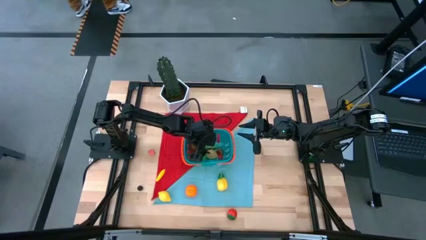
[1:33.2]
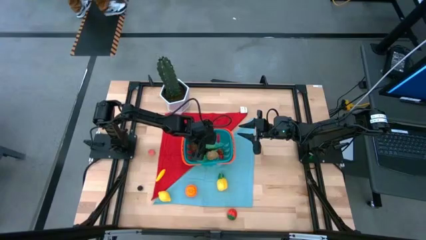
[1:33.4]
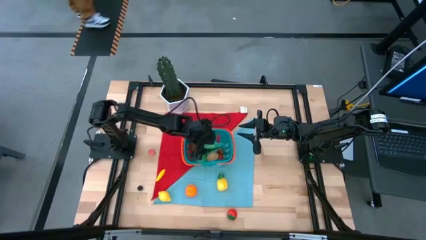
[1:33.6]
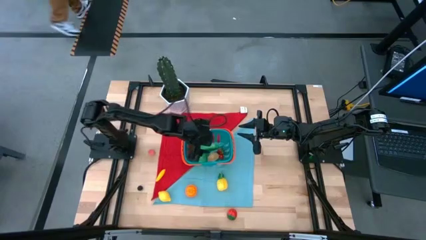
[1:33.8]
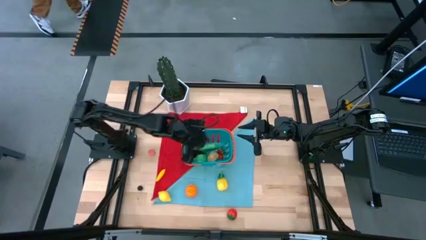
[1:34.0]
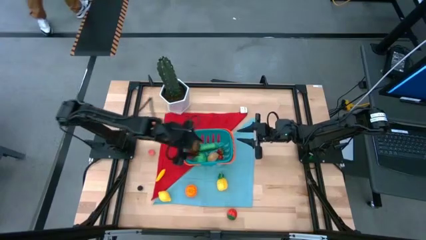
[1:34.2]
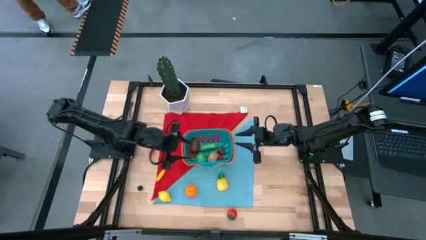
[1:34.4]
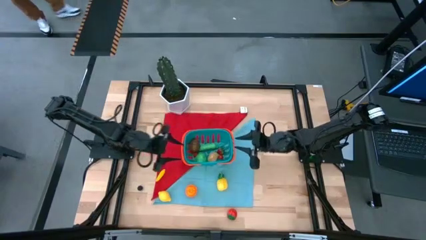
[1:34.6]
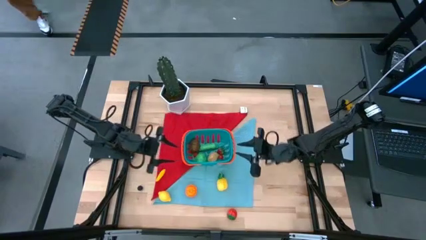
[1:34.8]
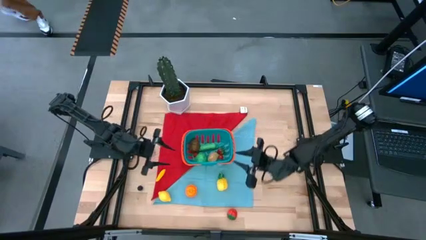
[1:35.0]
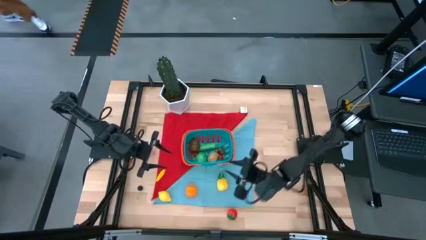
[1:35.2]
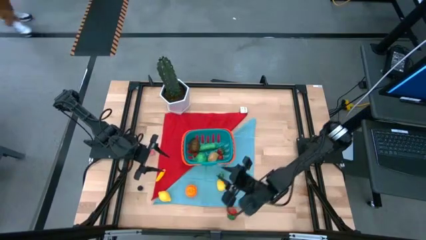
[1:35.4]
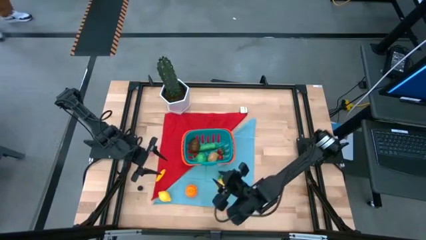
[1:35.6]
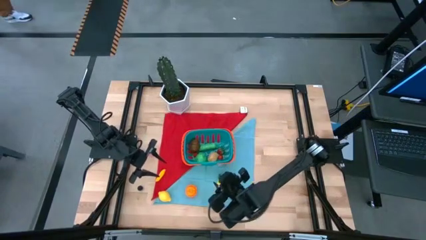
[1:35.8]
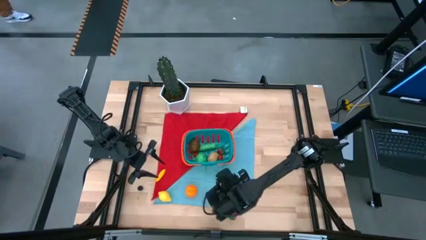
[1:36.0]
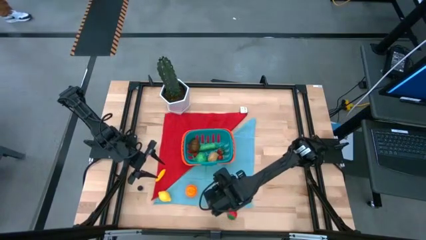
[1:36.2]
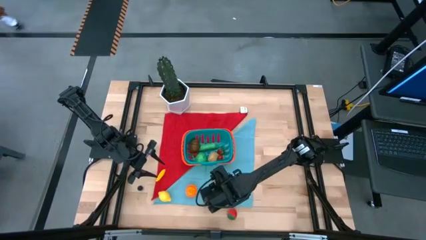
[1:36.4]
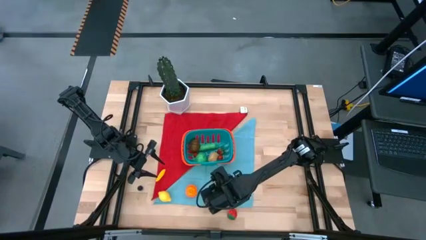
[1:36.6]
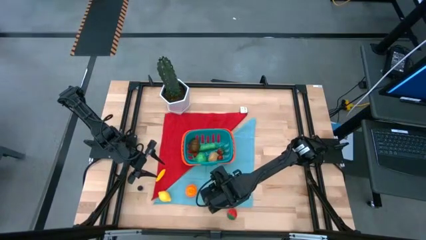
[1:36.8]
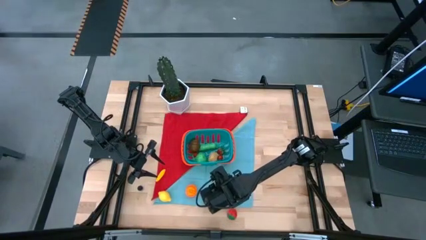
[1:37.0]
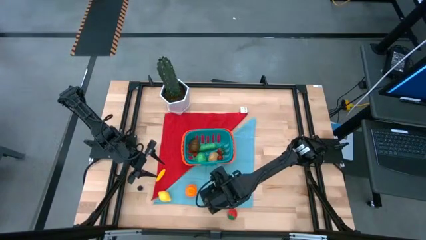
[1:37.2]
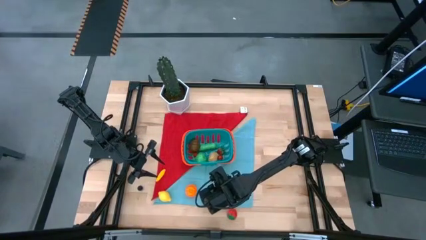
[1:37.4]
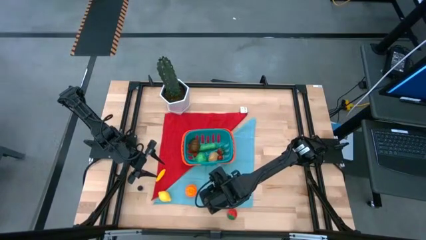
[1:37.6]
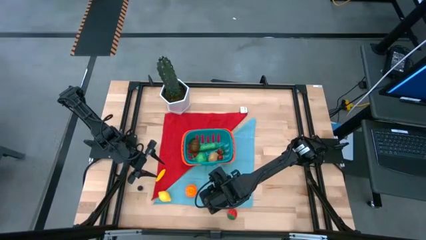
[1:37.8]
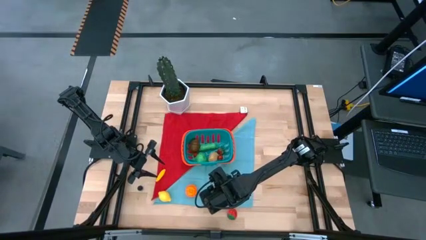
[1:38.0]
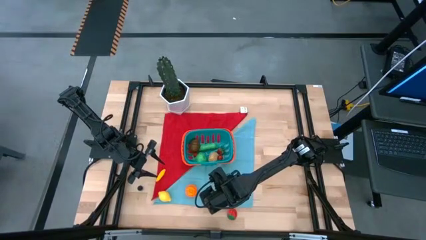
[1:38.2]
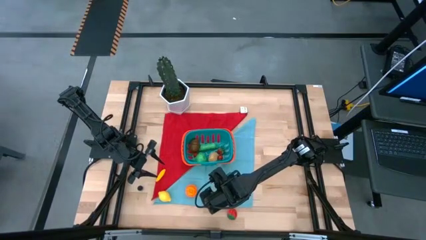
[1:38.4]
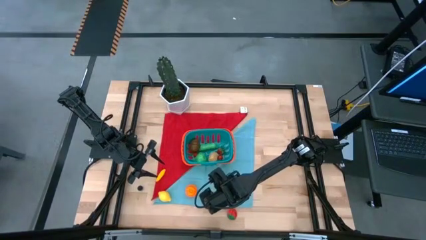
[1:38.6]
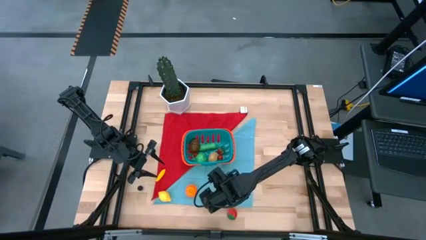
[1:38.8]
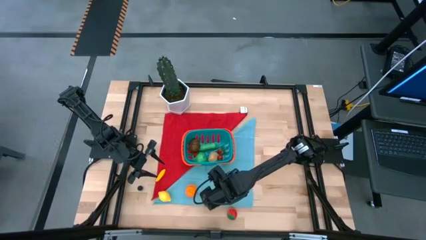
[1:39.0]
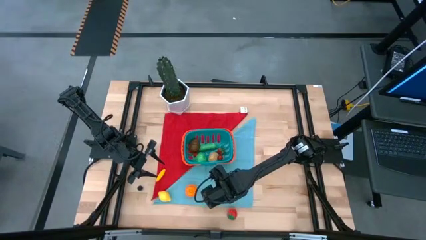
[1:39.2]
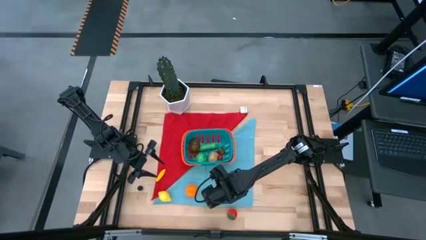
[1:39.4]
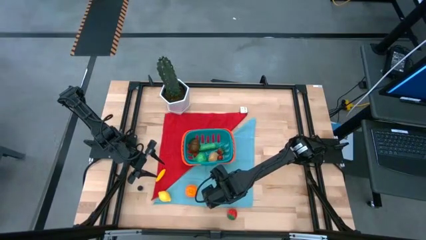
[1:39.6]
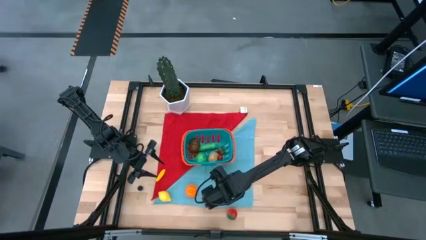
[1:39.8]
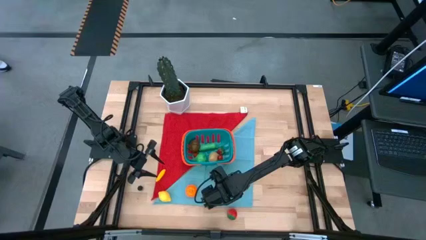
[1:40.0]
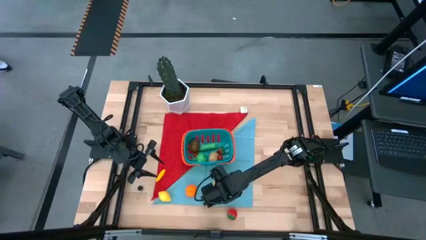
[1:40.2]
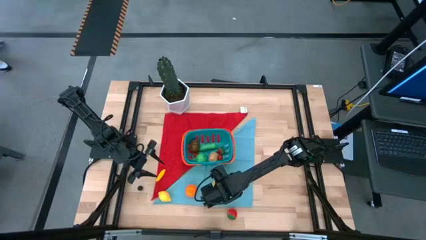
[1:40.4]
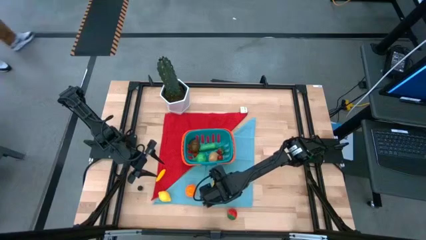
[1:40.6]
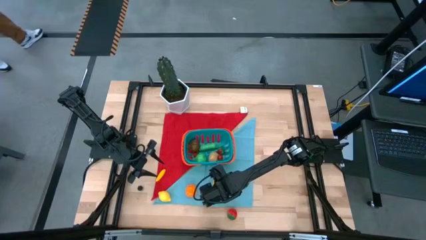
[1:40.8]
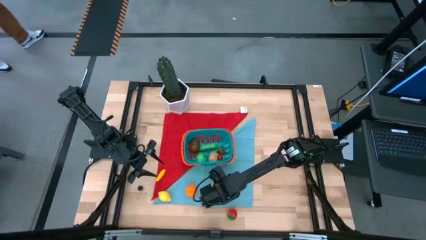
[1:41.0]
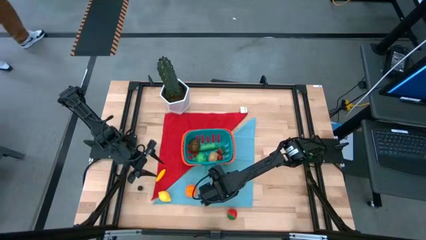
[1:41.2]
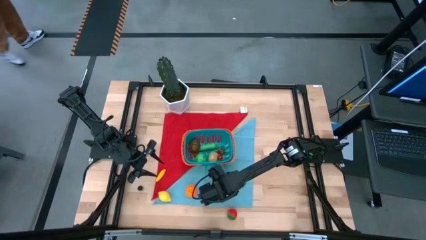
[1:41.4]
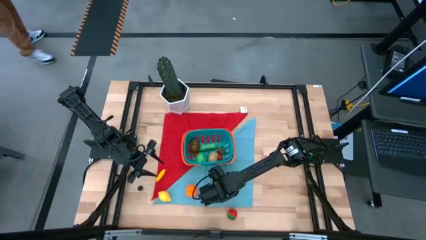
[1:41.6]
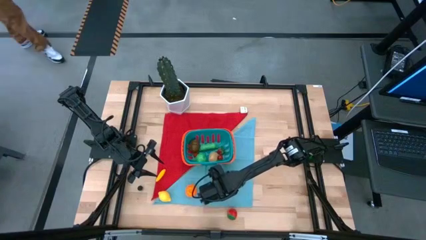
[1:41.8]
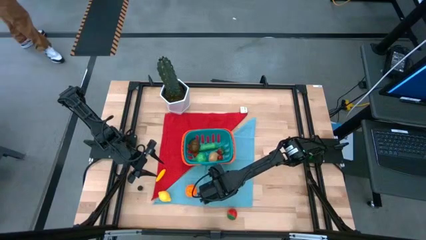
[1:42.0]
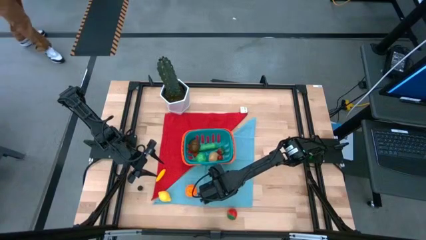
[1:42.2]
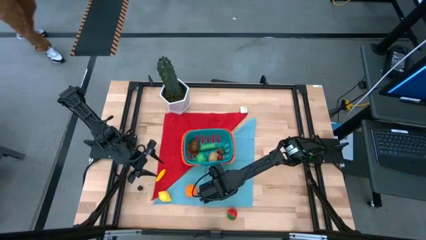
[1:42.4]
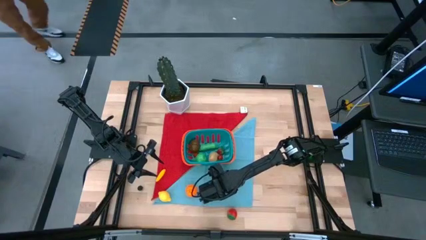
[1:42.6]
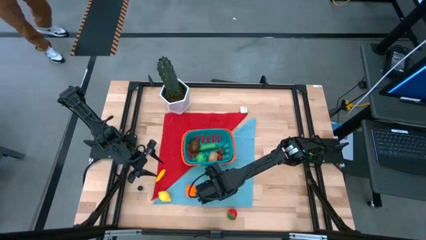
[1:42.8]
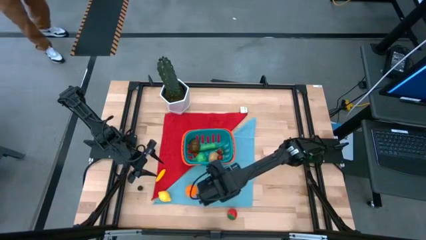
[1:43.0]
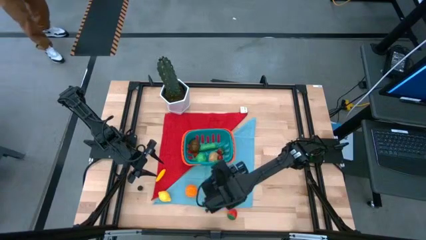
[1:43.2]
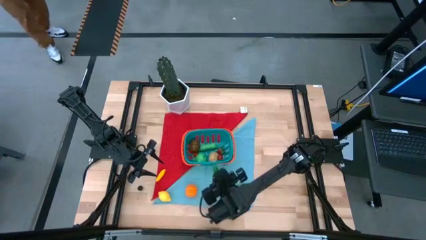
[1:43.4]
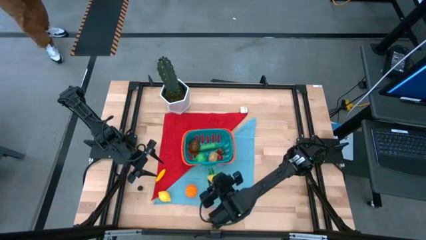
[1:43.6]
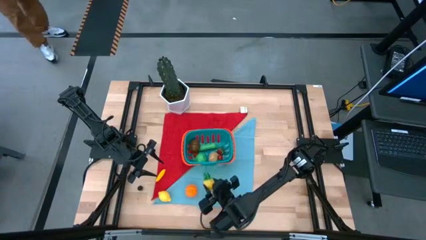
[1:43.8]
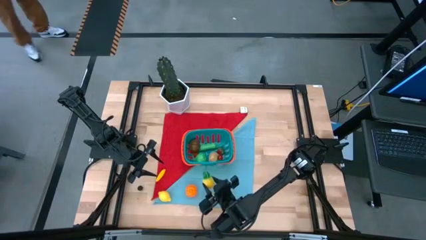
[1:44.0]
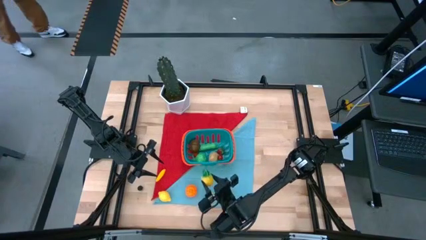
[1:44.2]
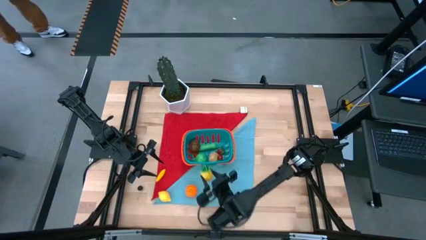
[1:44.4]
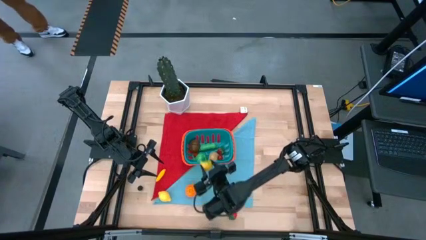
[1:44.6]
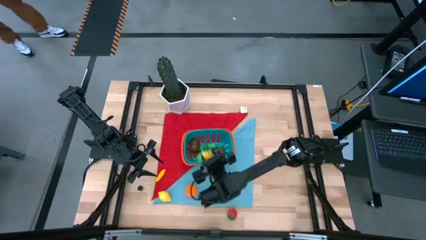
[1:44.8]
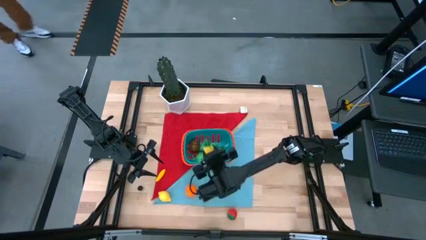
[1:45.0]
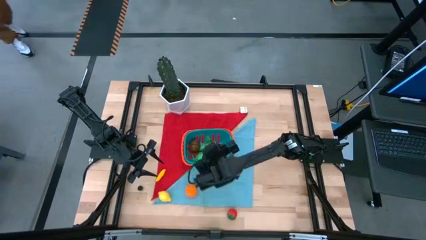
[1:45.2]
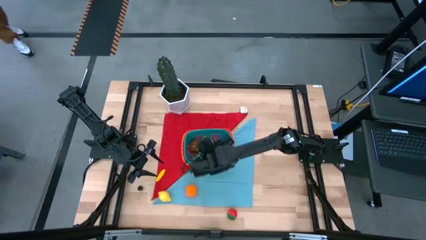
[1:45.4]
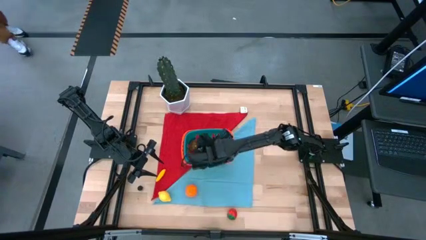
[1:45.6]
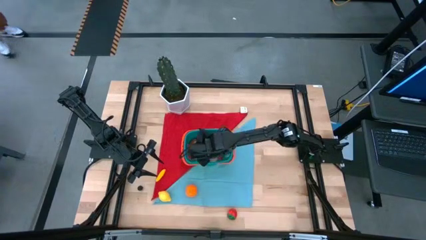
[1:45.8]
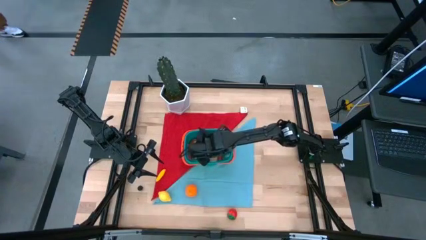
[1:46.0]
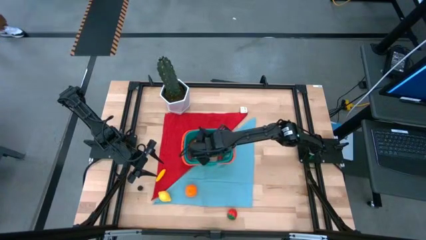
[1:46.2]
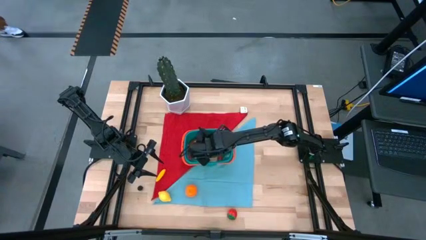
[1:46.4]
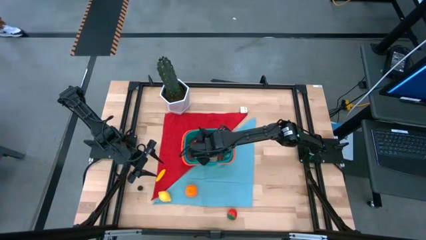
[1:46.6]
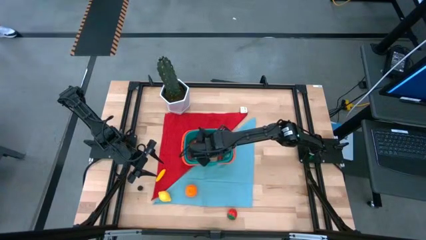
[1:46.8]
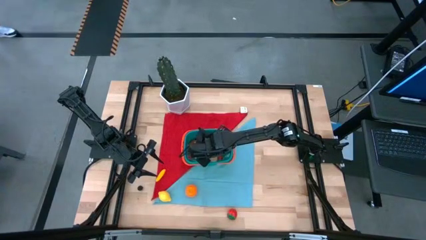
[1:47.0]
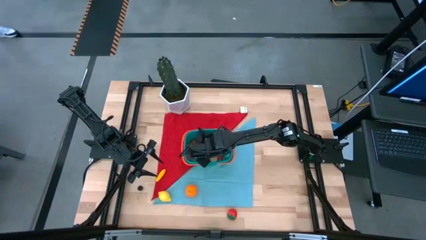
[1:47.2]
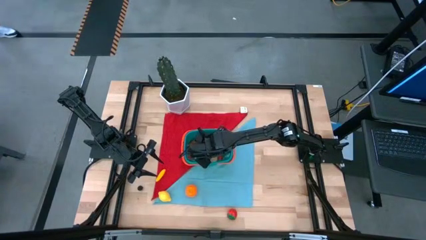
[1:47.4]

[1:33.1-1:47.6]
Task: Build produce basket
Put the yellow pineapple into the blue basket
